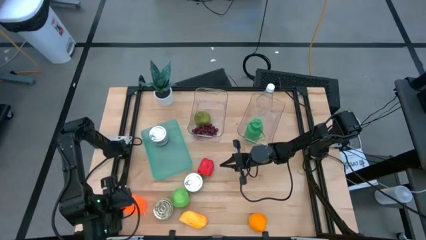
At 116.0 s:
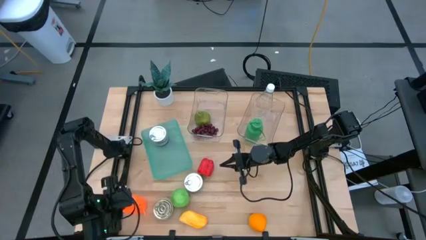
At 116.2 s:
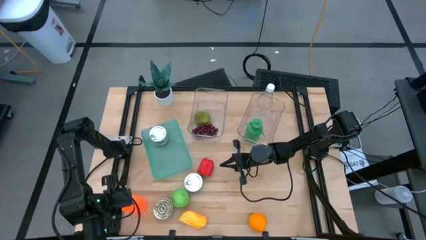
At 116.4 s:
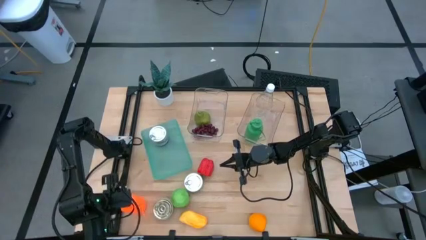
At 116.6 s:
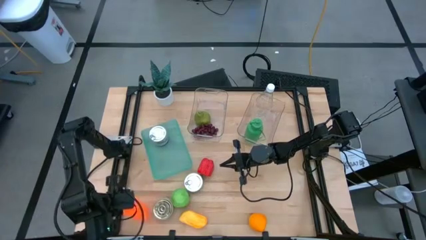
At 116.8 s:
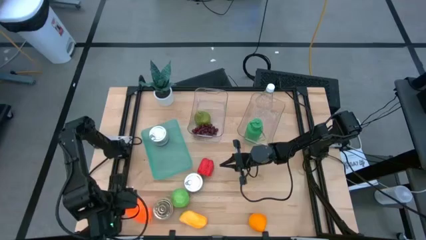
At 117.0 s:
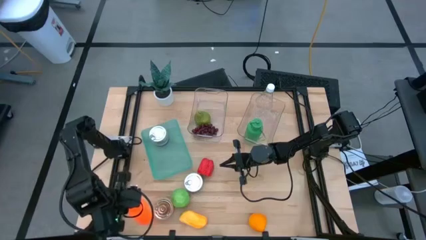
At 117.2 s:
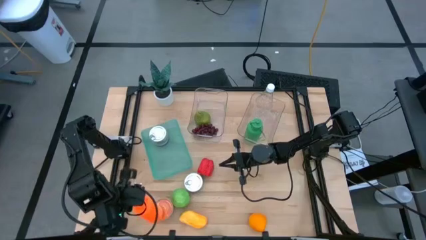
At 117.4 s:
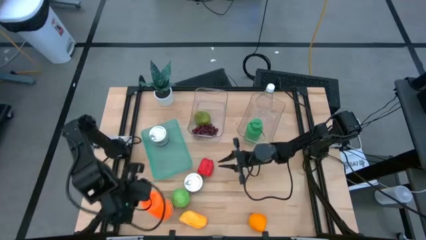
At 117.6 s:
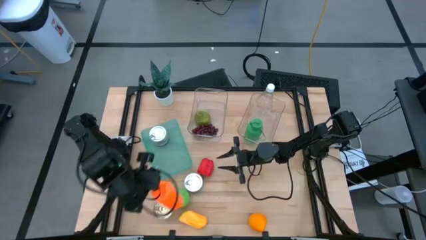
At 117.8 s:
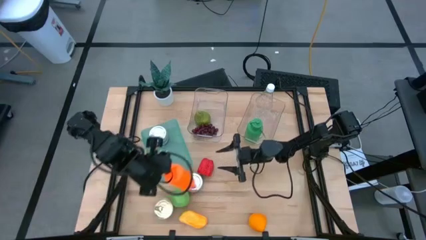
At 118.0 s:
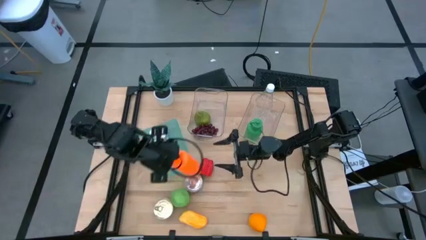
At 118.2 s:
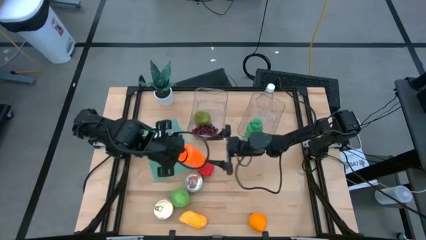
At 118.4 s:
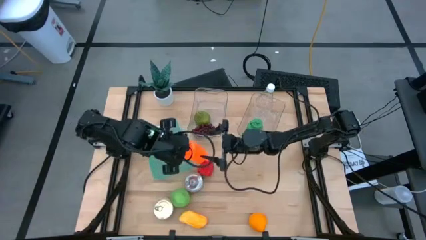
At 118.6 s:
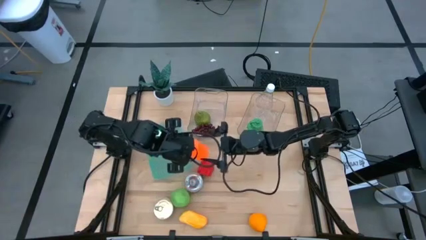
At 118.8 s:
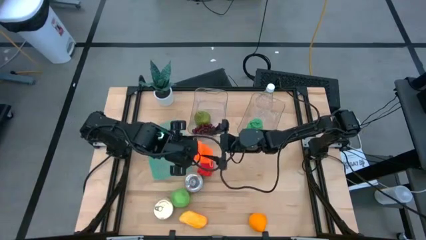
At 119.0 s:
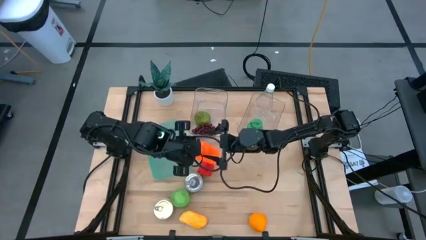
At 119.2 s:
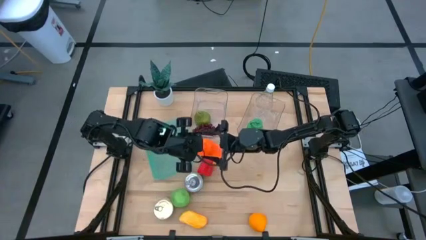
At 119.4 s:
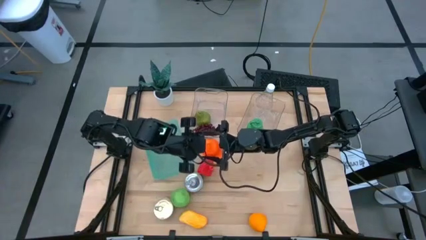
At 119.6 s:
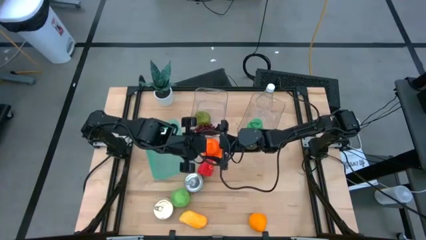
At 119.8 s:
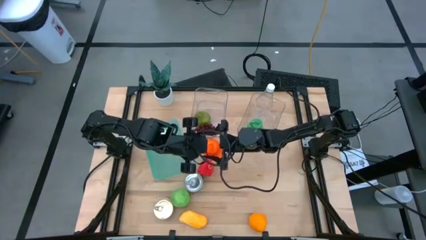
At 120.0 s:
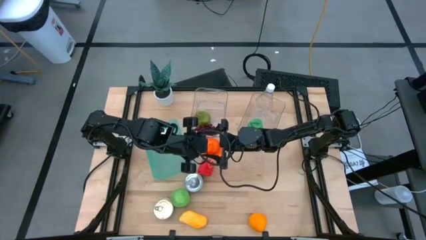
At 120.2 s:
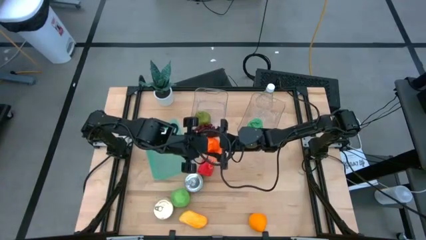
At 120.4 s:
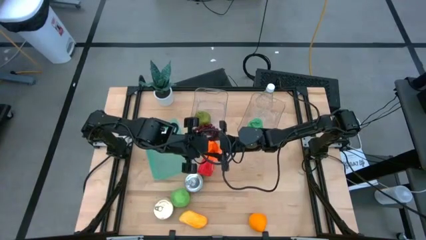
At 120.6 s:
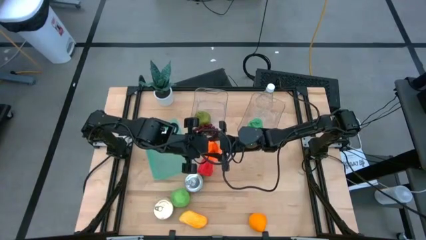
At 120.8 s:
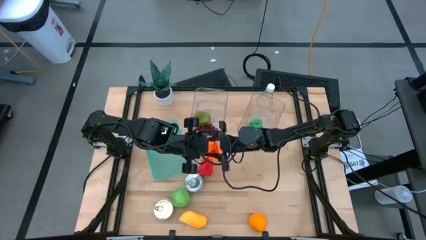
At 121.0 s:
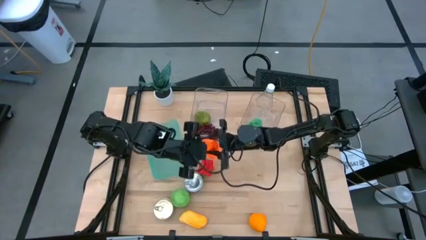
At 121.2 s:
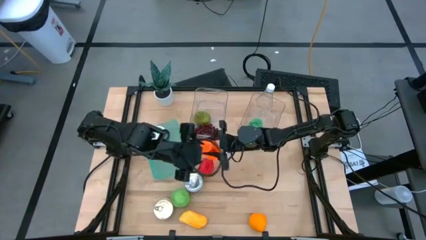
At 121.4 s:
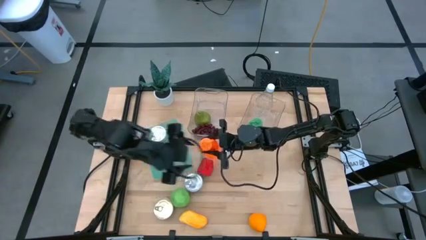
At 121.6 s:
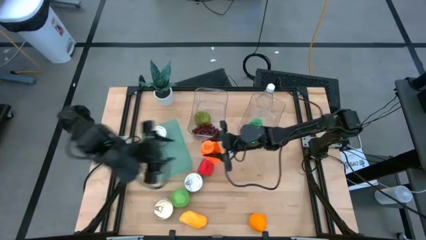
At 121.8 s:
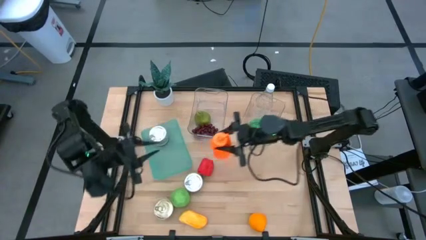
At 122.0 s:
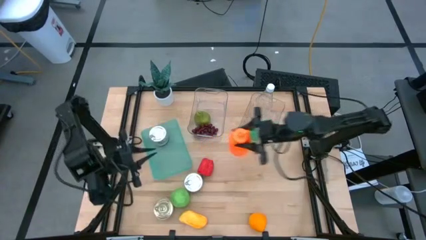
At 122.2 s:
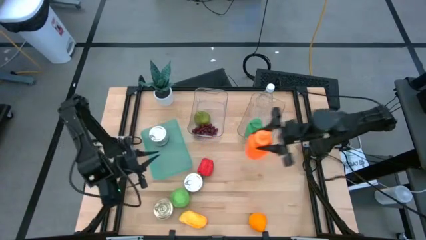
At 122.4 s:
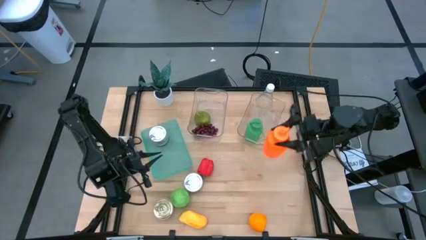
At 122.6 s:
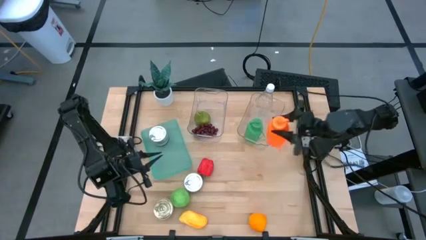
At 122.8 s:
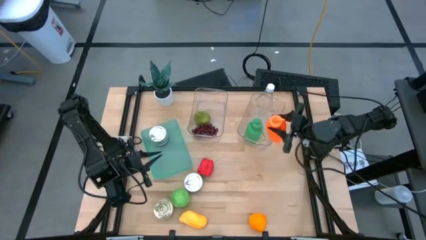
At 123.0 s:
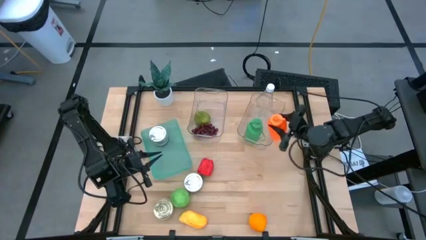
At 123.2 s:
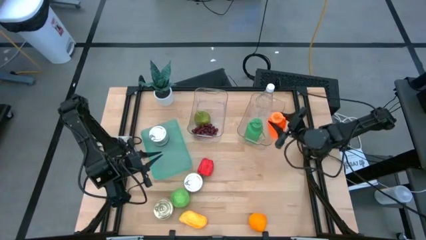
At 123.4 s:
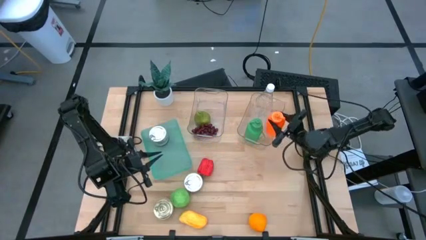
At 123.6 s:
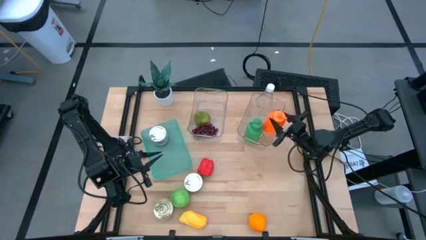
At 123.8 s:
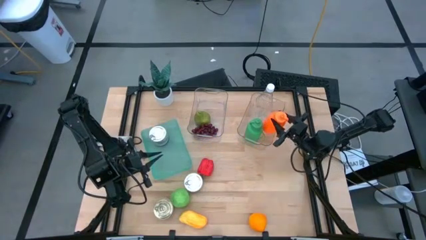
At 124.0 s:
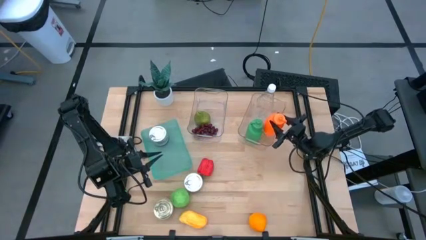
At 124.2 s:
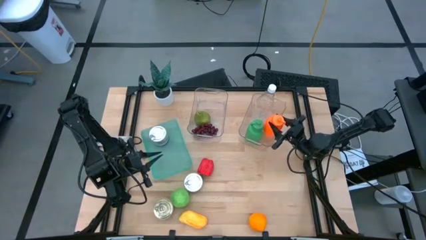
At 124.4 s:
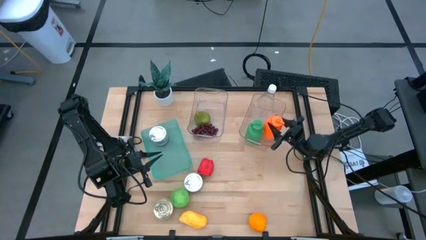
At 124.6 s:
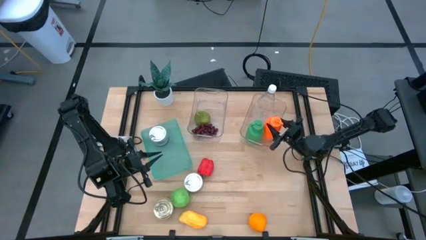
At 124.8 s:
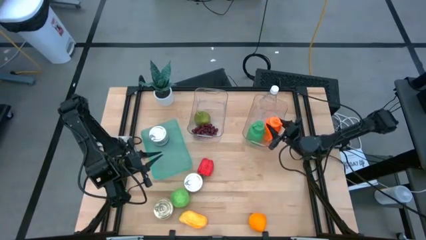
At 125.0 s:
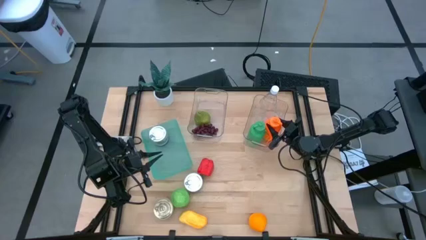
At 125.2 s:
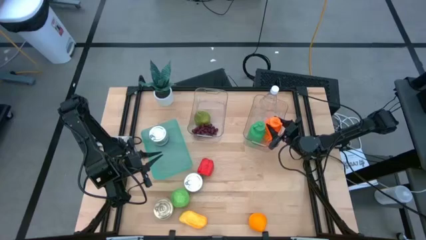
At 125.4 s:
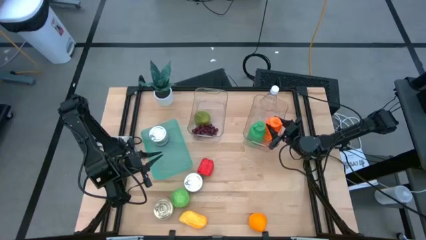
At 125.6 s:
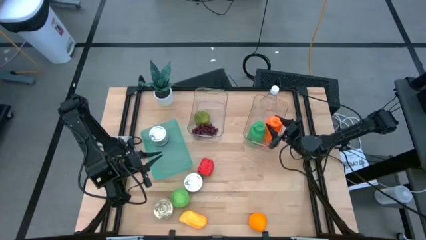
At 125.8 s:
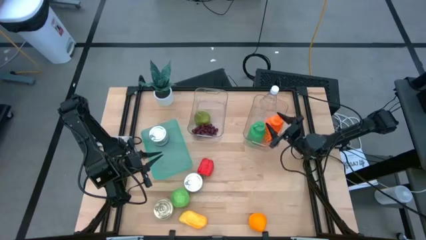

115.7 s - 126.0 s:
Task: Pick & Place Food Item
Put the orange water bottle into the right transparent bin
